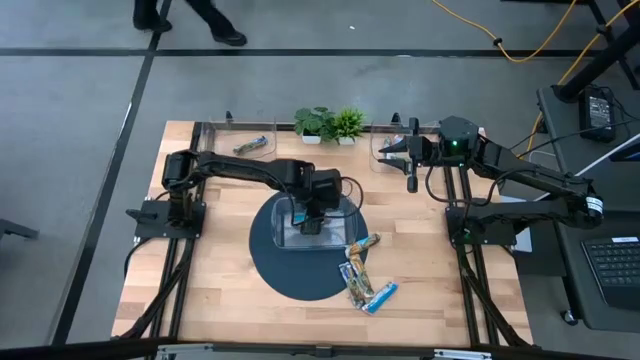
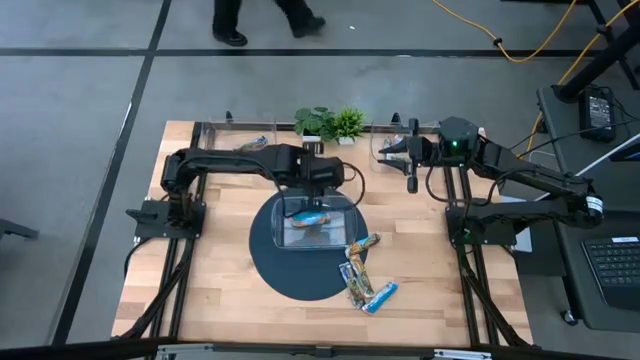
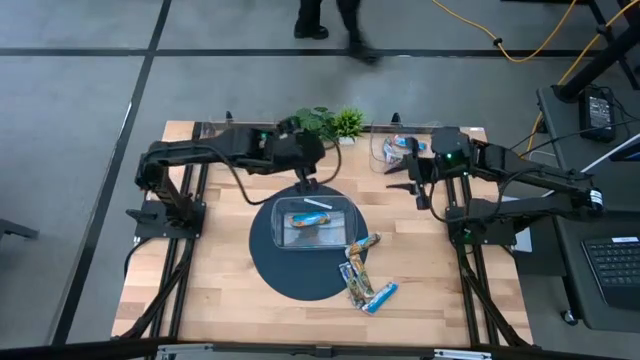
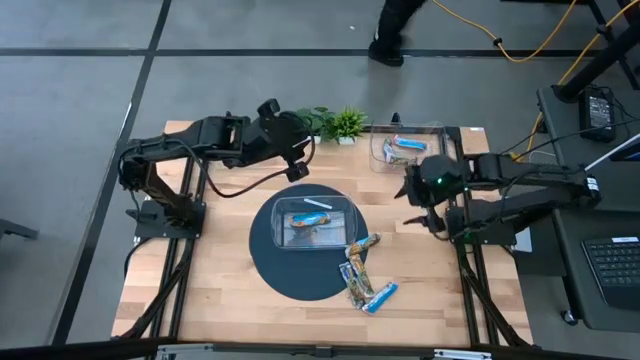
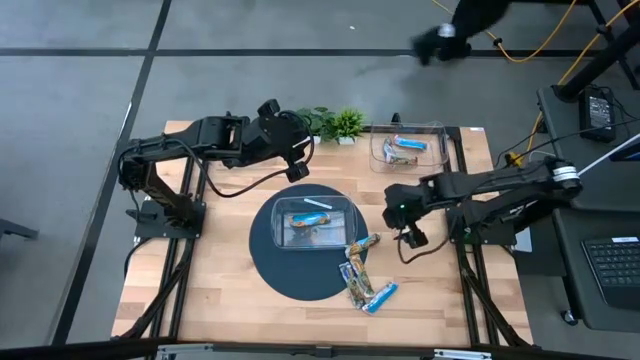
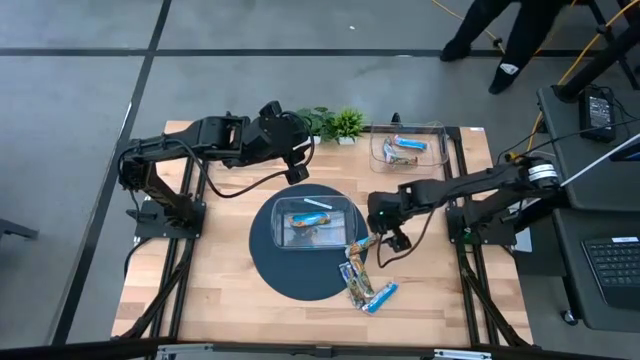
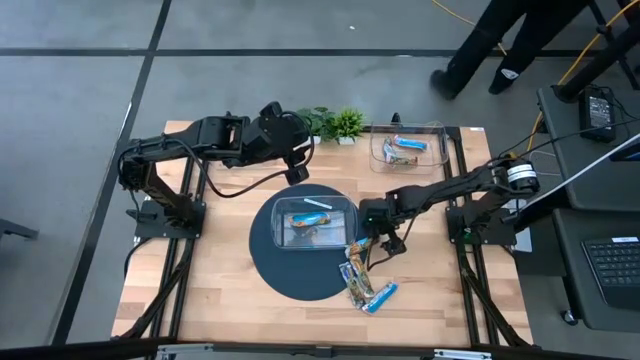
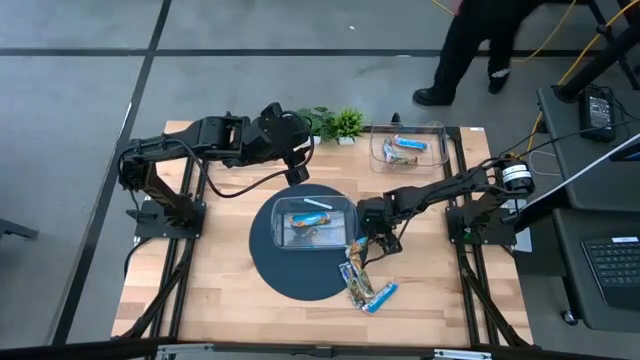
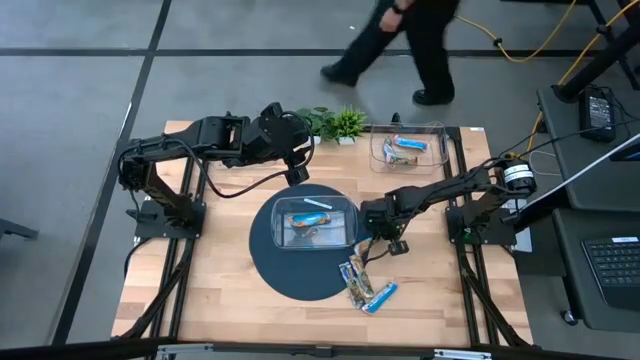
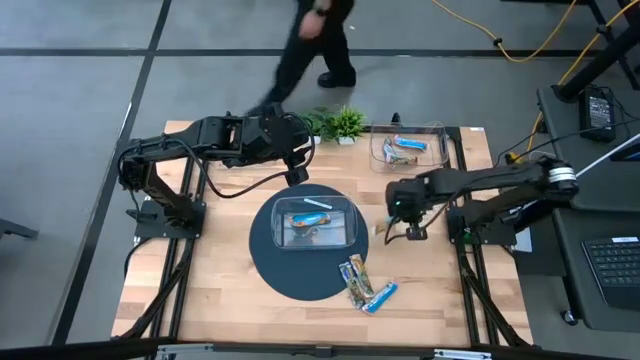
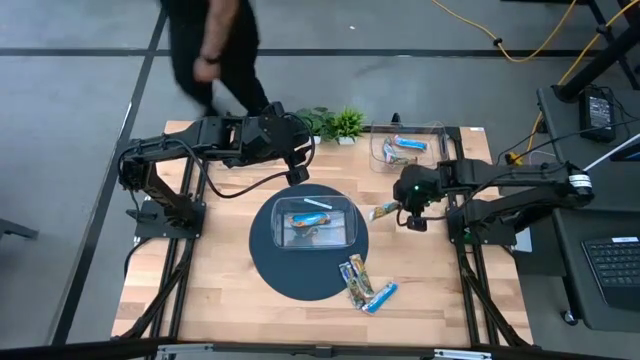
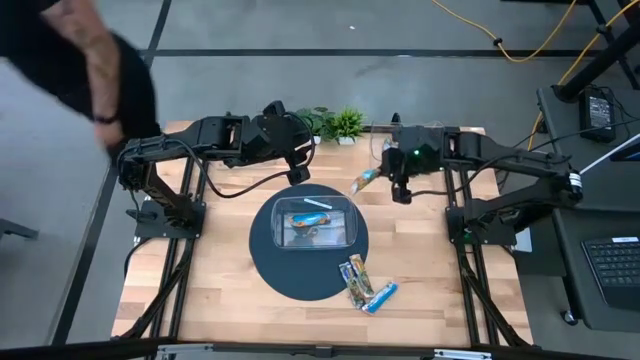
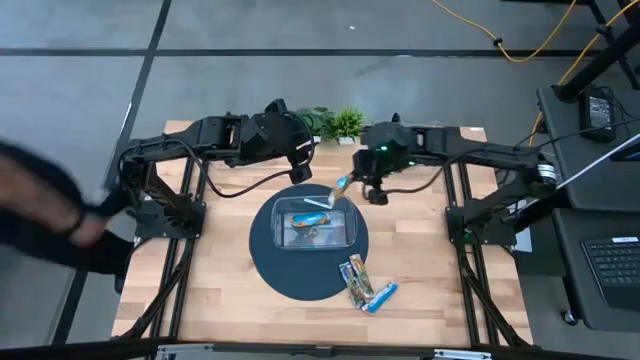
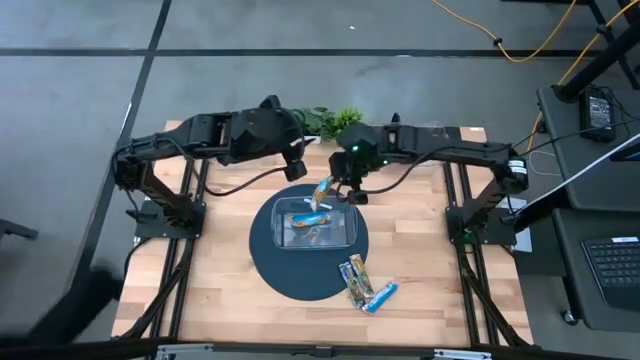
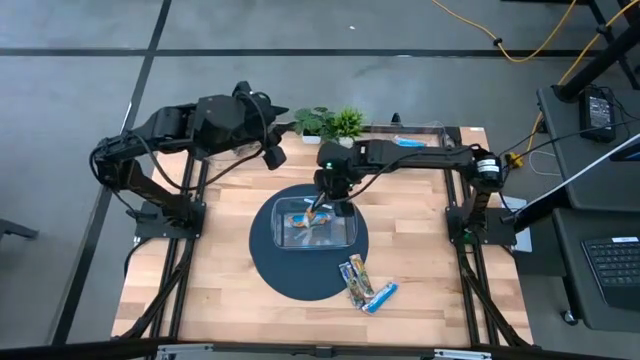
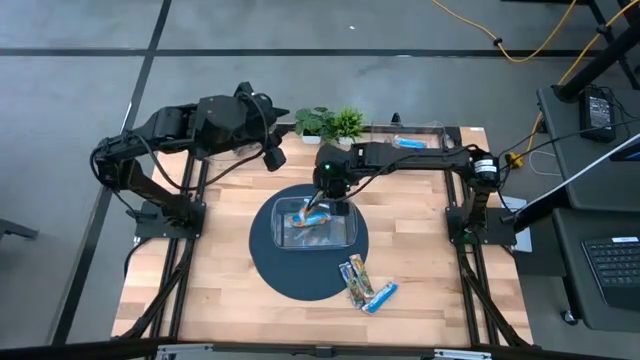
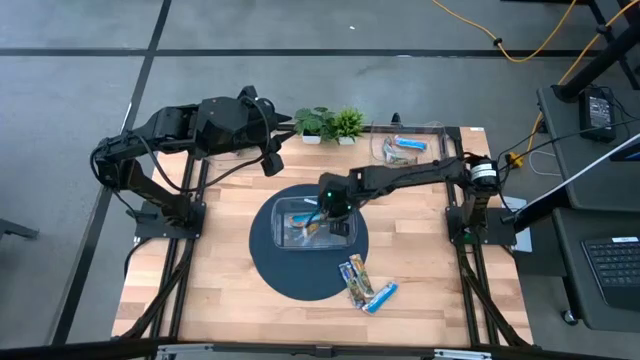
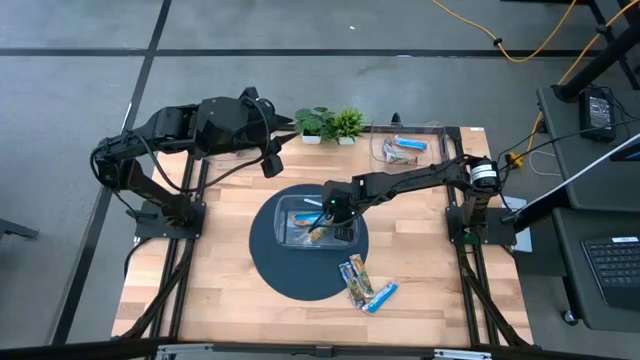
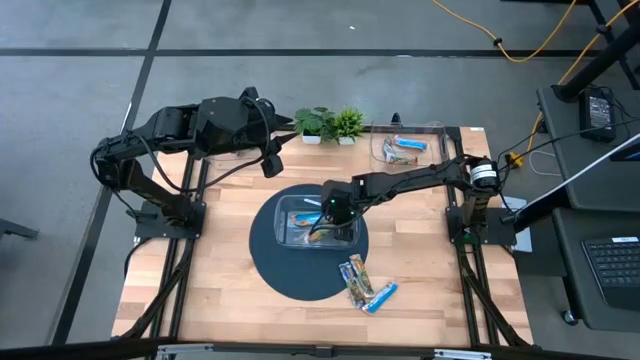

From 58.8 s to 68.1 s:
Task: Pick and place Granola Bars by type
Put the yellow granola bar into the bottom transparent bin

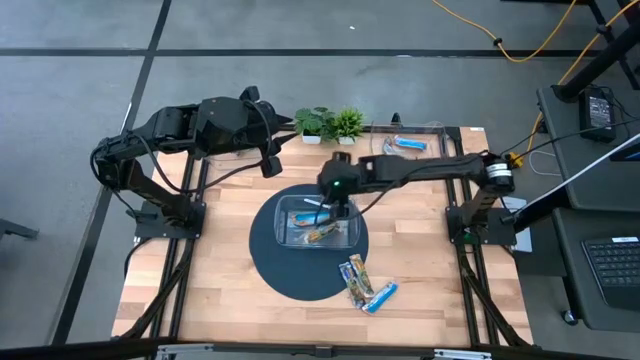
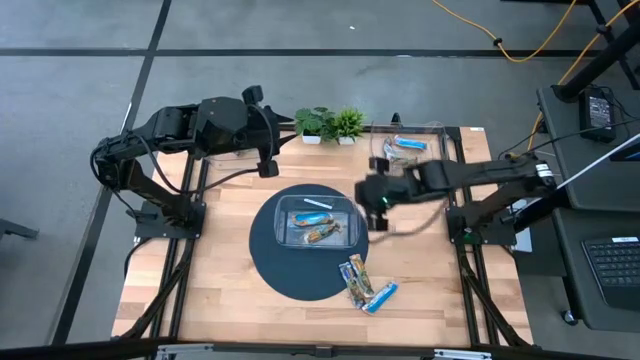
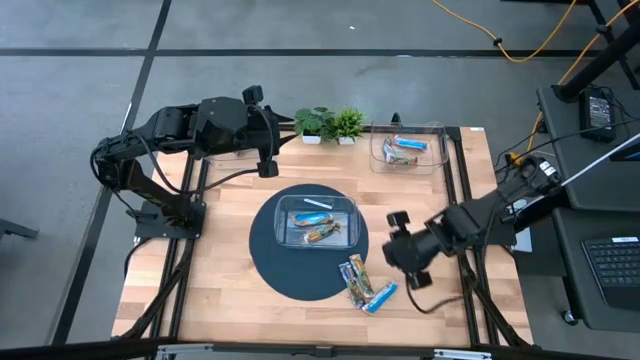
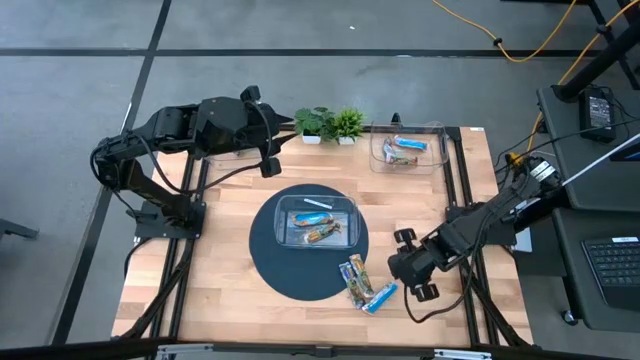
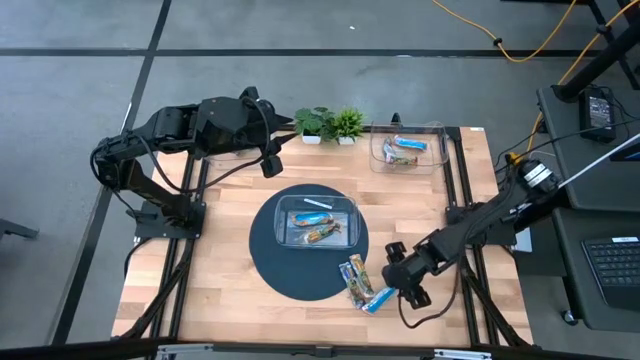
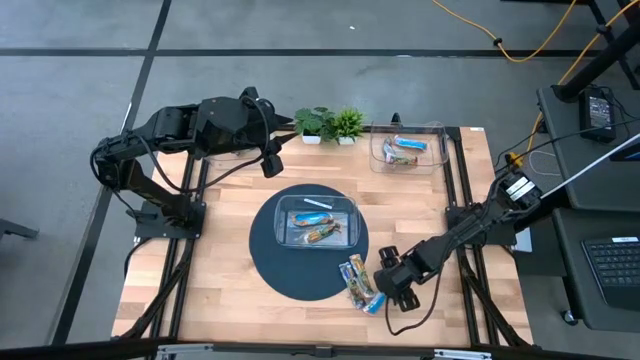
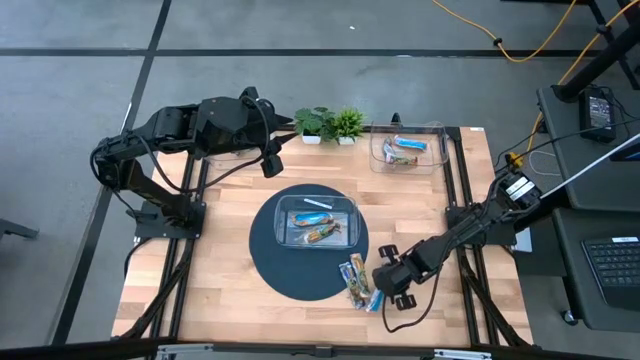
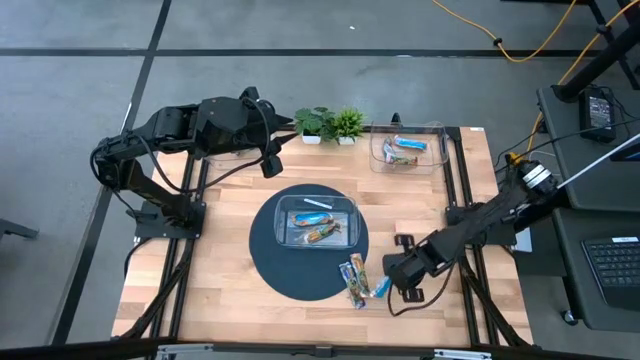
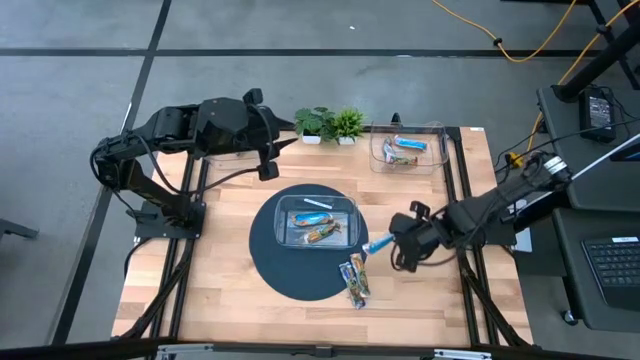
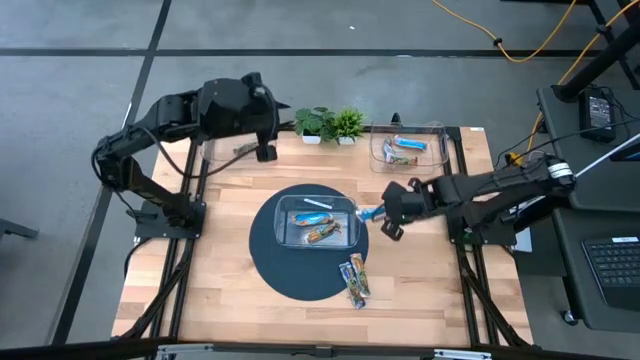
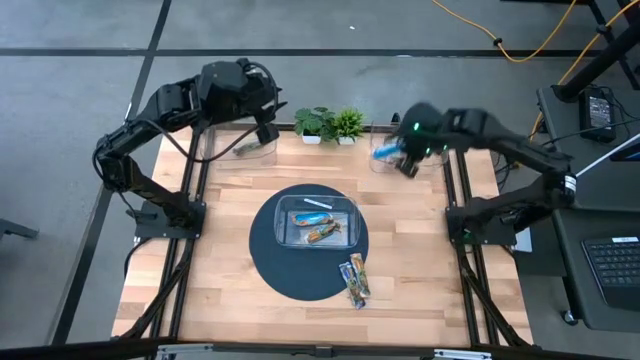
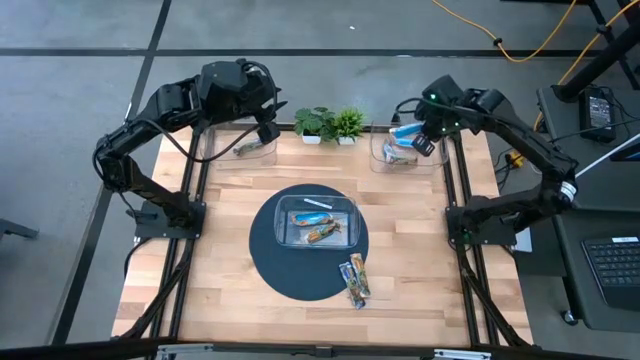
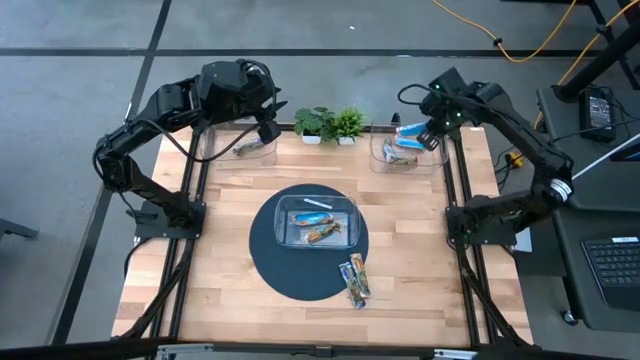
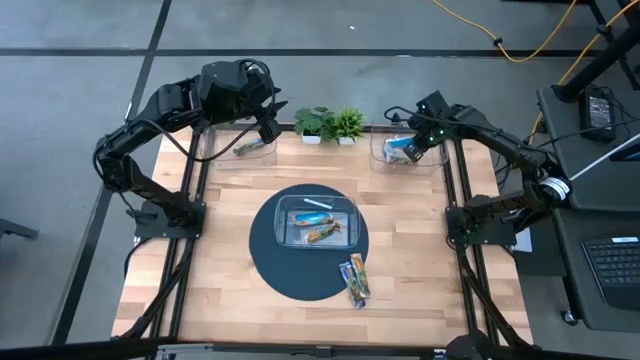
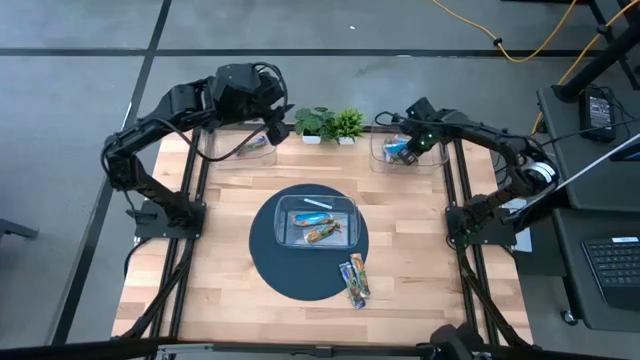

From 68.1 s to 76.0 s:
Put the red granola bar into the top right transparent bin

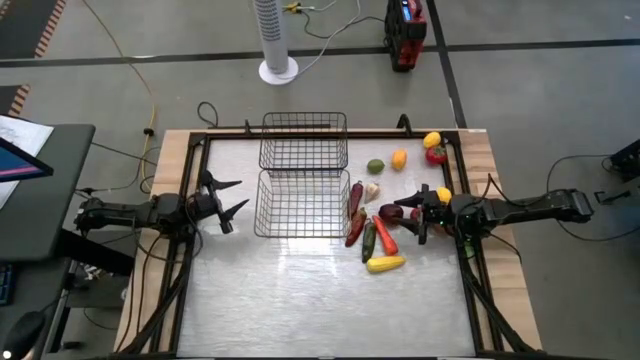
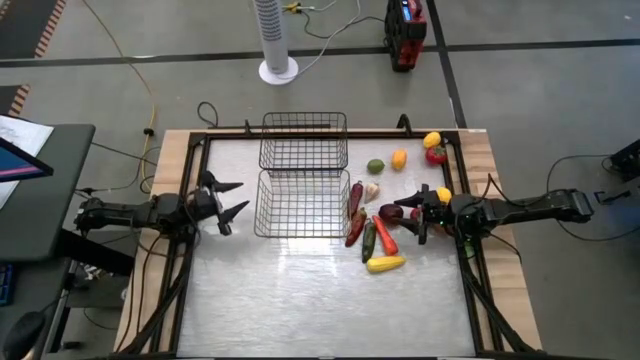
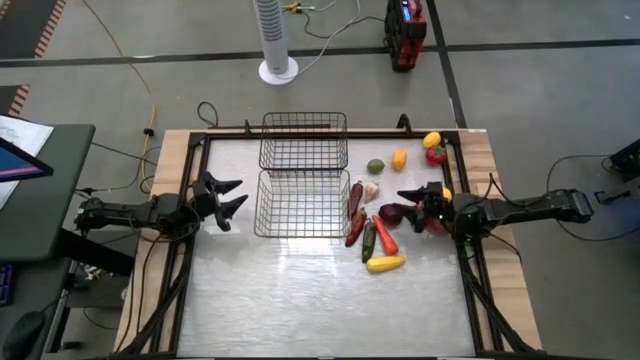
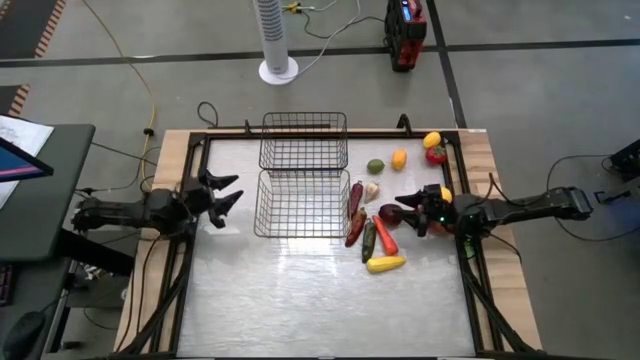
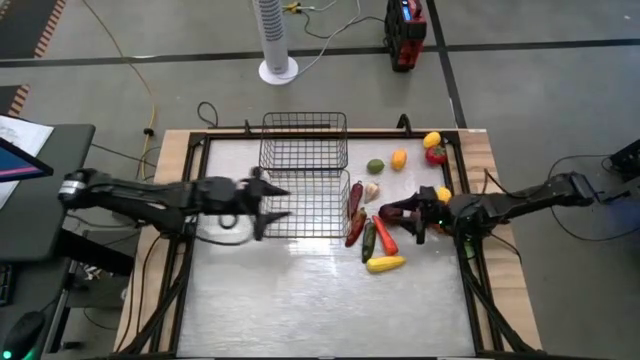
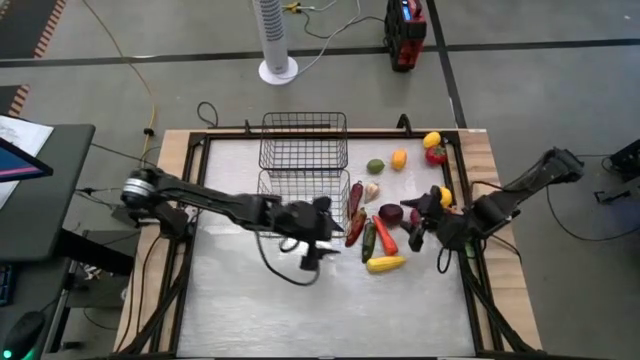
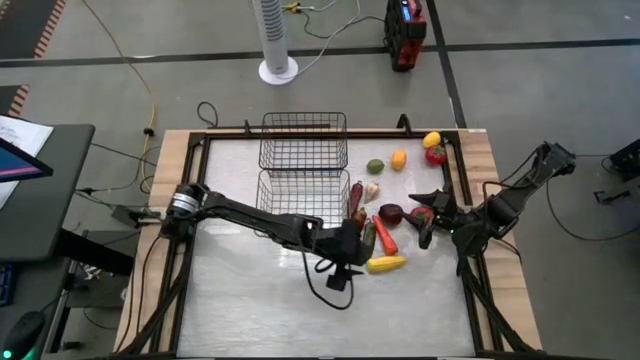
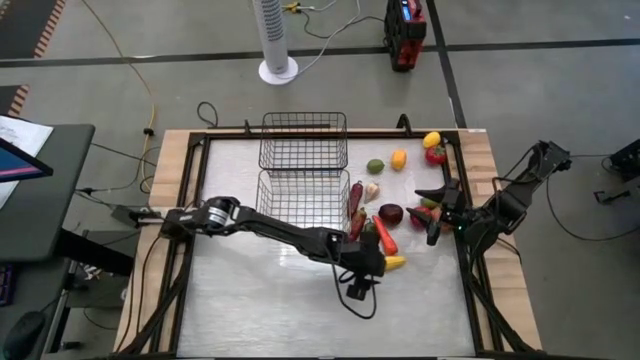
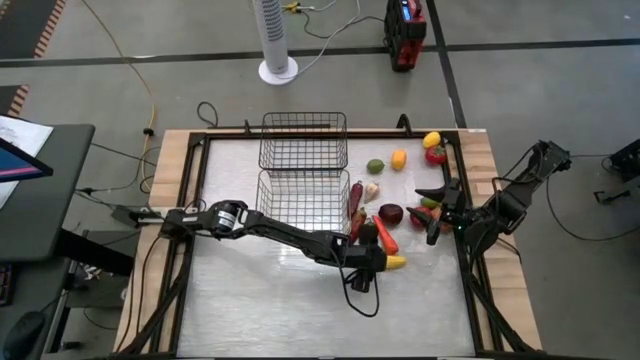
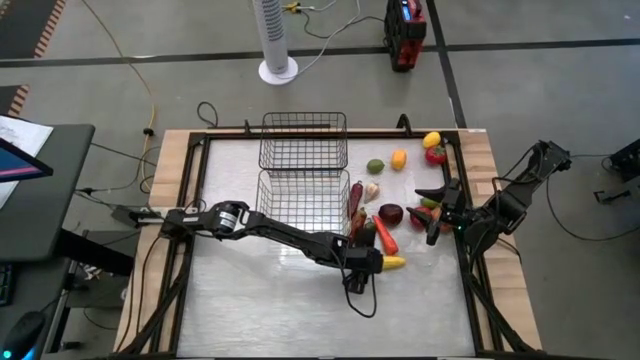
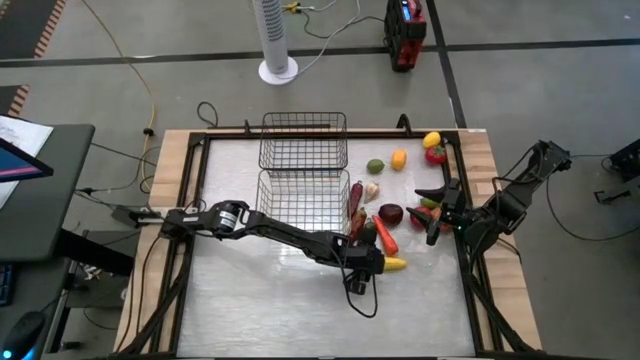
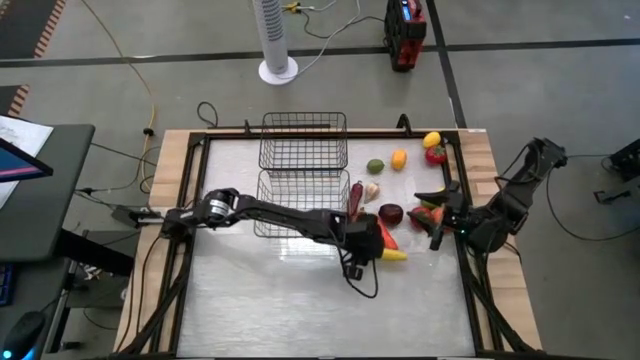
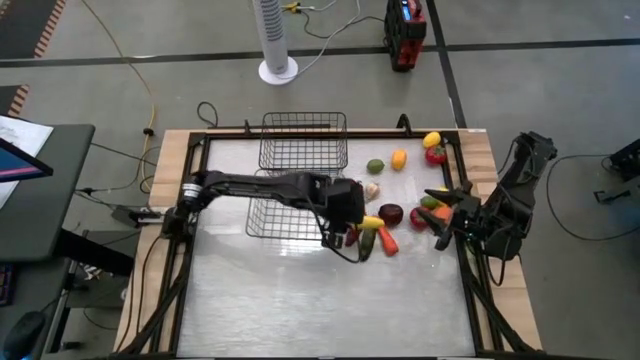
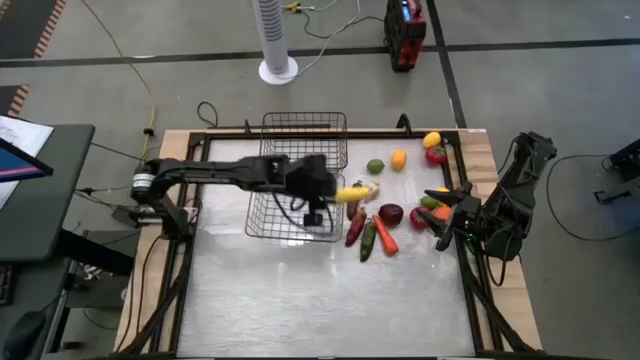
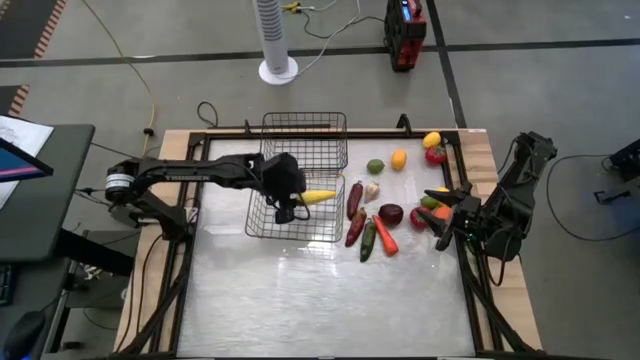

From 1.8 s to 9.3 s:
Task: Sort produce into baskets
Put the corn into the bottom wire basket
